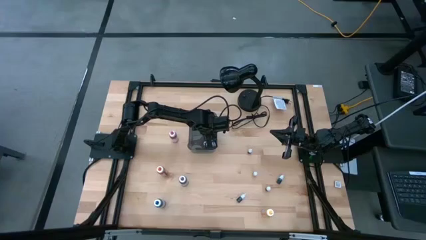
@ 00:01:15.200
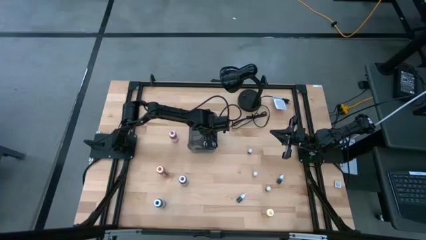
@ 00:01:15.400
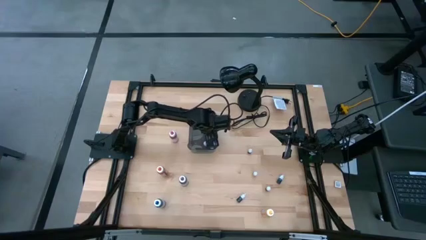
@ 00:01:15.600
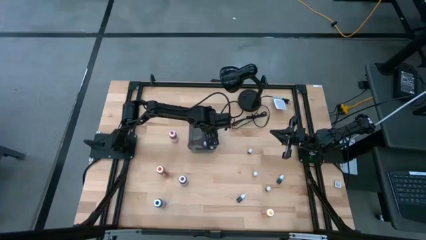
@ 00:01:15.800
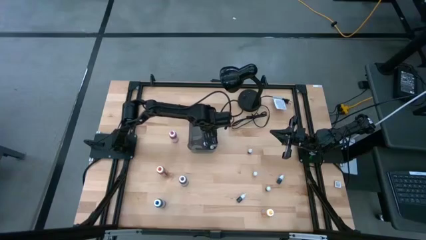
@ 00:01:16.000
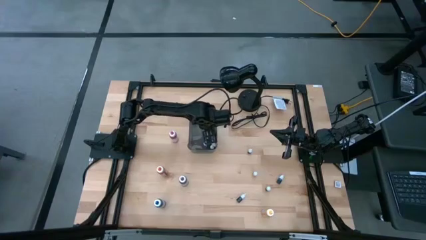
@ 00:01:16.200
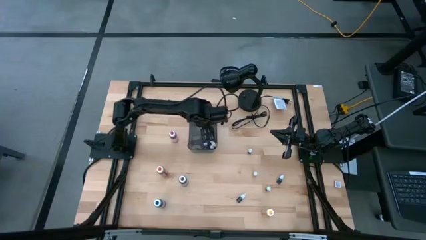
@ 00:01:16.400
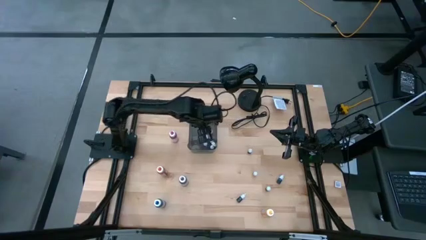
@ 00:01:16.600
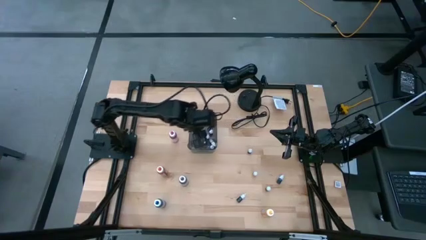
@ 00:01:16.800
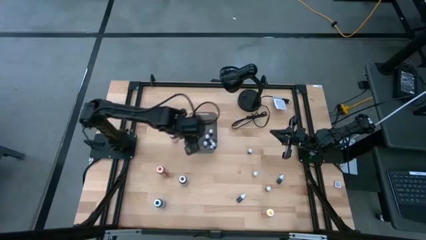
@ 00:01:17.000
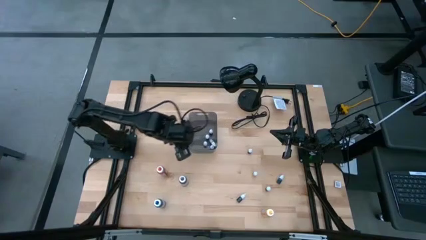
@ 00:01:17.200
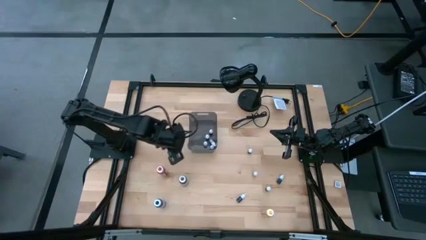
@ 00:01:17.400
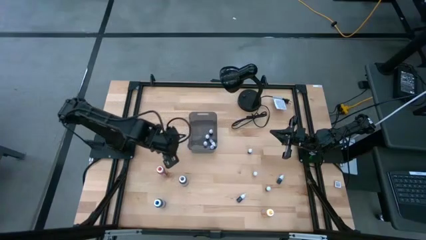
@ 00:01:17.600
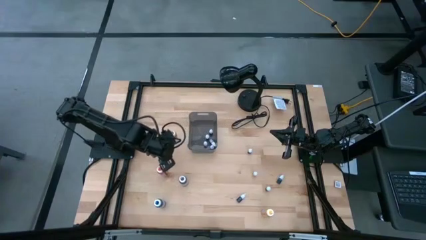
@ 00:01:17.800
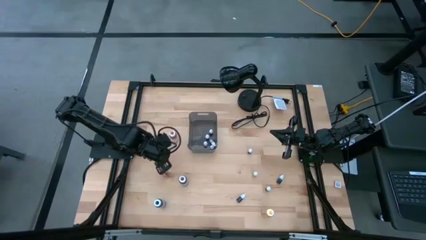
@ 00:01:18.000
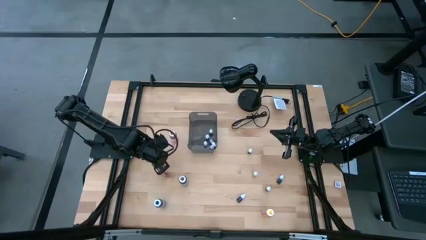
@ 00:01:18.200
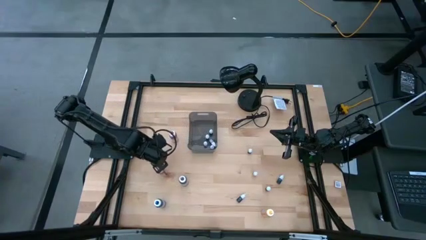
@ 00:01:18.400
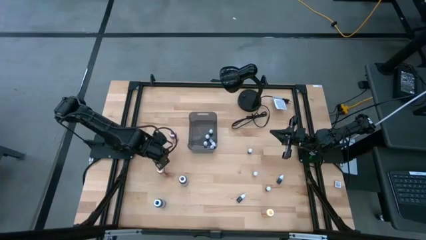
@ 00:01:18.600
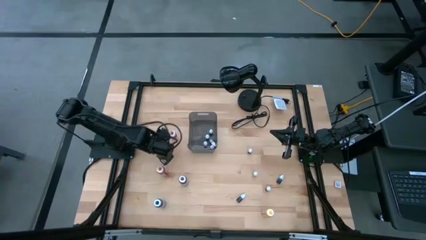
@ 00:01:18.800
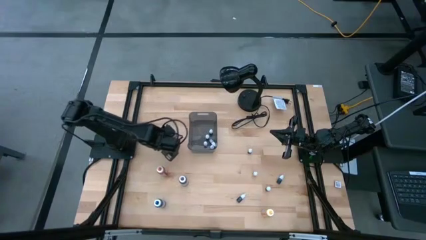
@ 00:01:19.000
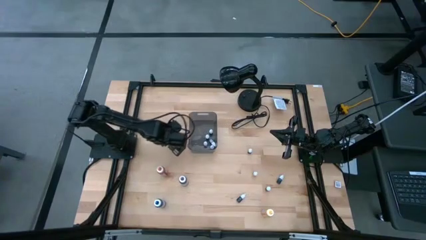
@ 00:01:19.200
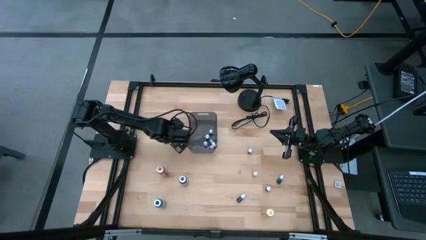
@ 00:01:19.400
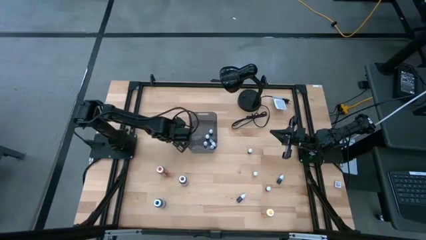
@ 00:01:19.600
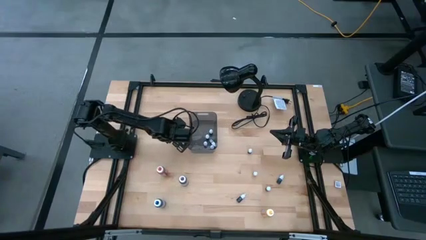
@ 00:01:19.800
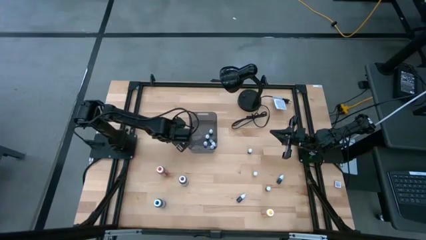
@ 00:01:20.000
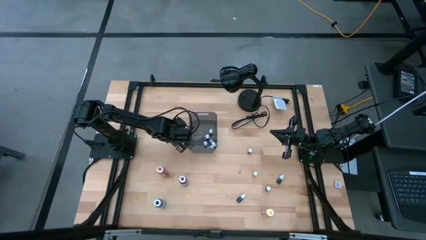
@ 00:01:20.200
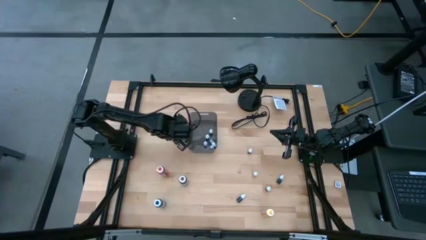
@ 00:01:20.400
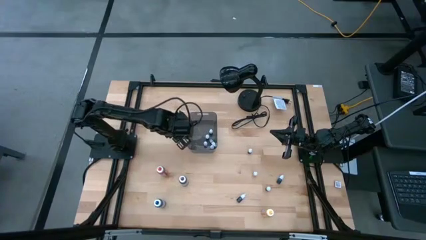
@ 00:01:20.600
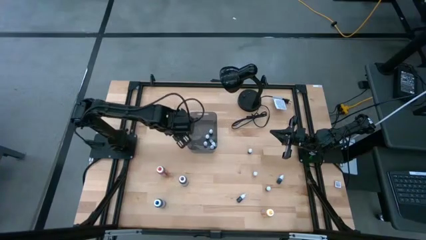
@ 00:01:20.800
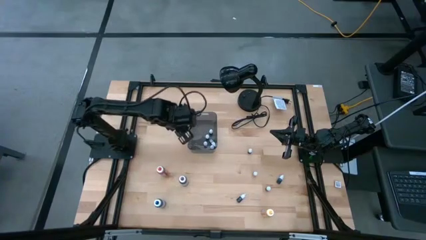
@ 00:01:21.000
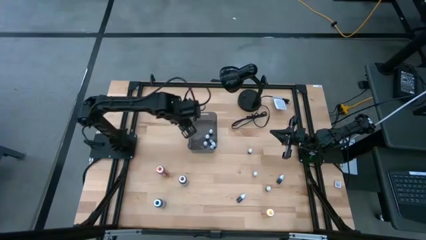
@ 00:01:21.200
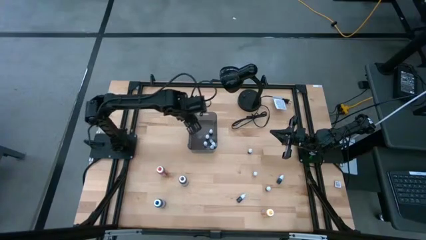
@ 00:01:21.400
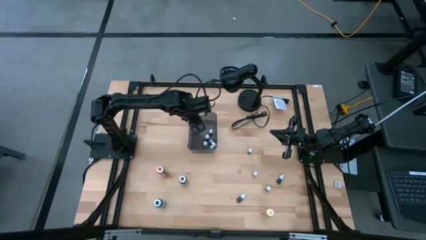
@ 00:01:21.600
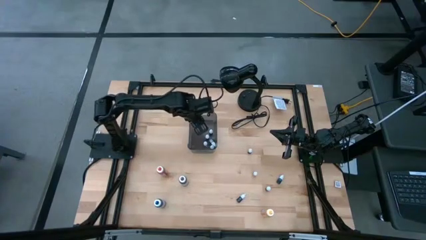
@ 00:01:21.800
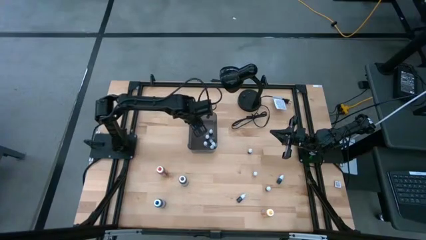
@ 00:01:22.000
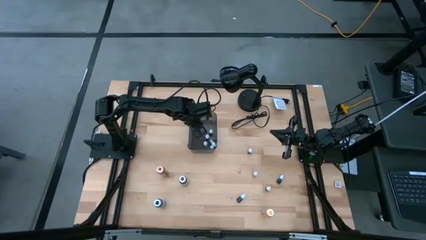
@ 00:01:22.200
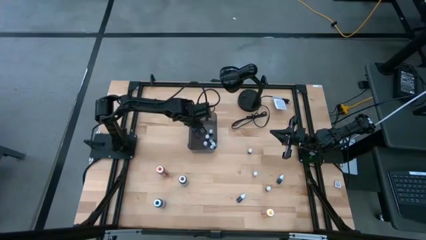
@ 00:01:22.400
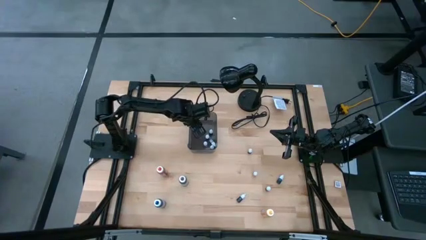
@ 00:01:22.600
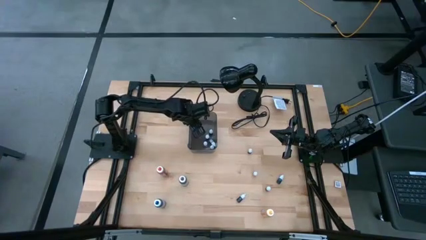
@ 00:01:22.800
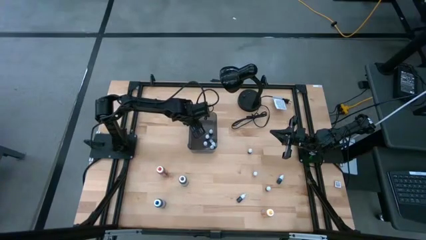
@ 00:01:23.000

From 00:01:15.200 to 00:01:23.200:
Task: Pick & Place food coloring
Put the big pink food coloring bottle into the gray transparent bin

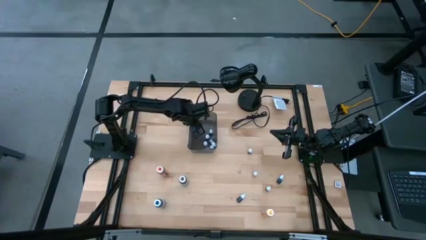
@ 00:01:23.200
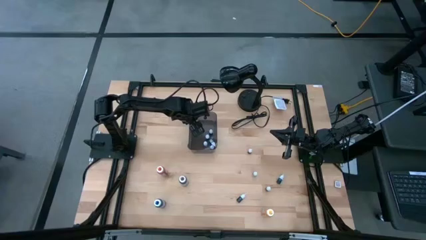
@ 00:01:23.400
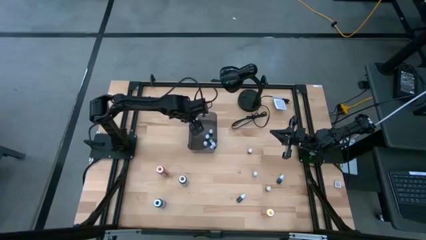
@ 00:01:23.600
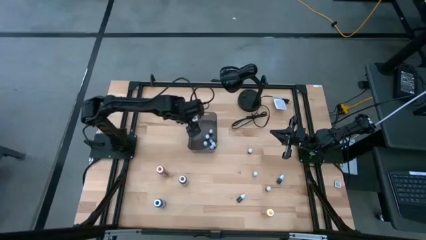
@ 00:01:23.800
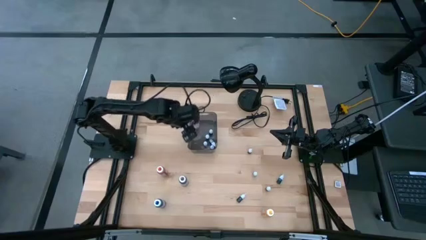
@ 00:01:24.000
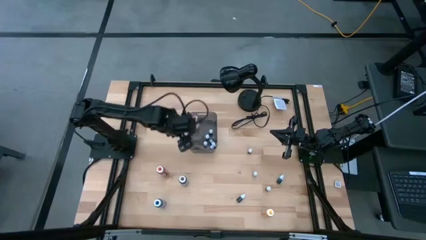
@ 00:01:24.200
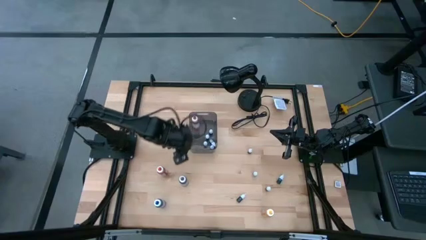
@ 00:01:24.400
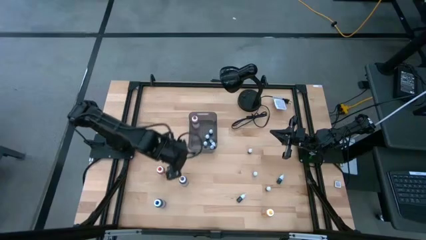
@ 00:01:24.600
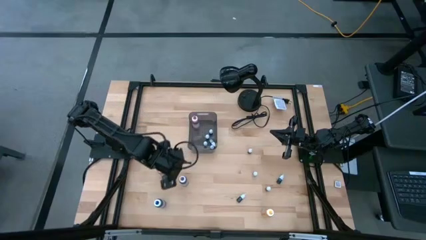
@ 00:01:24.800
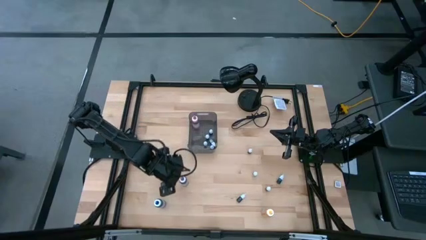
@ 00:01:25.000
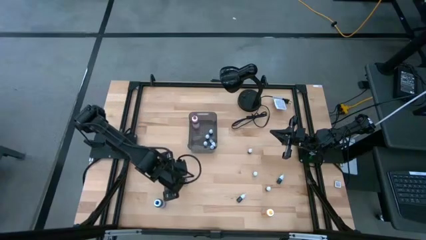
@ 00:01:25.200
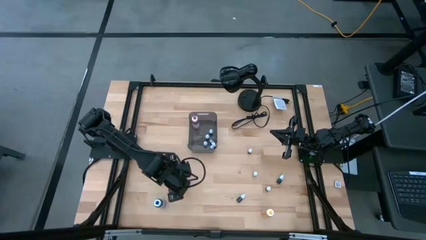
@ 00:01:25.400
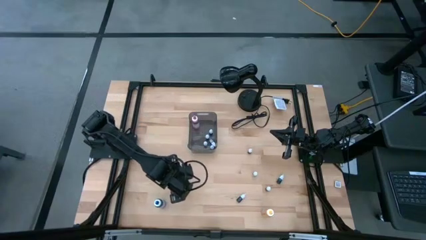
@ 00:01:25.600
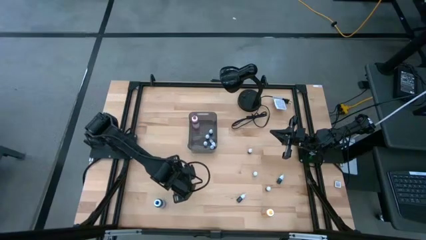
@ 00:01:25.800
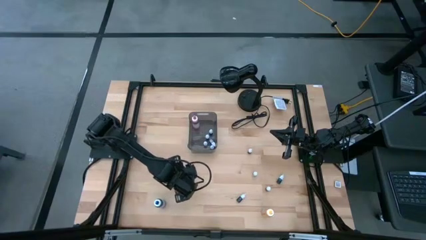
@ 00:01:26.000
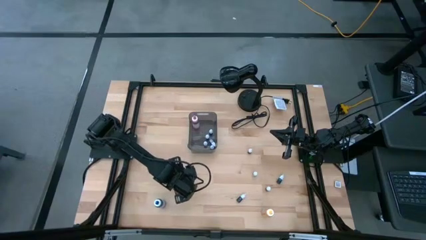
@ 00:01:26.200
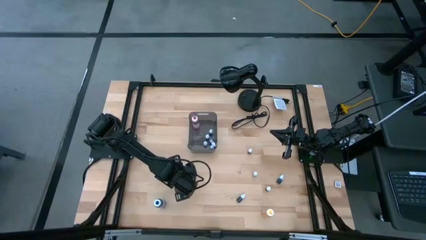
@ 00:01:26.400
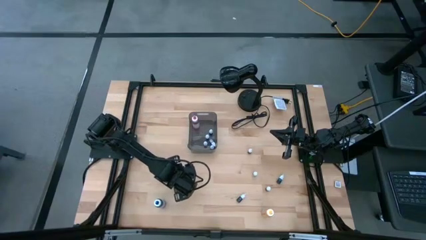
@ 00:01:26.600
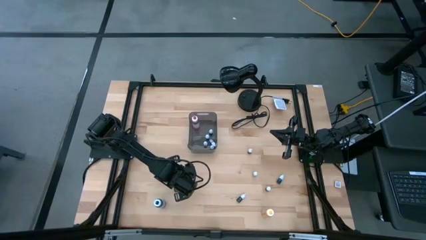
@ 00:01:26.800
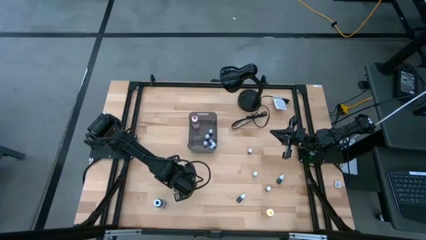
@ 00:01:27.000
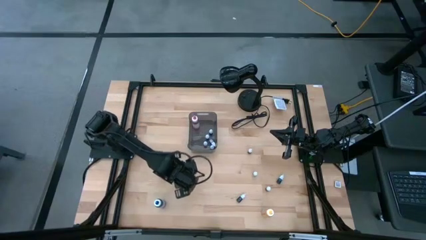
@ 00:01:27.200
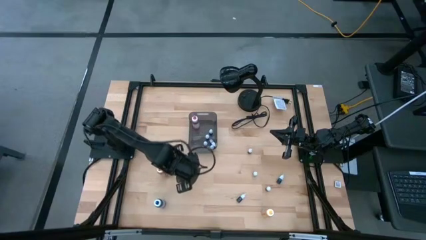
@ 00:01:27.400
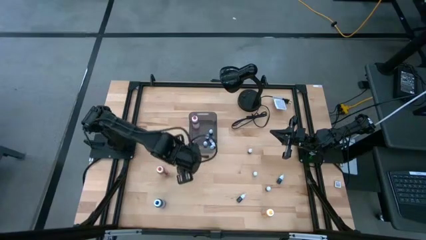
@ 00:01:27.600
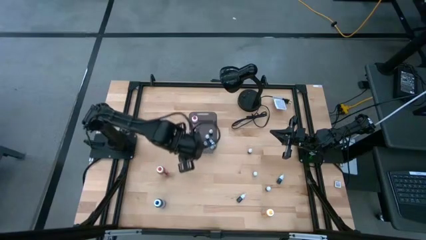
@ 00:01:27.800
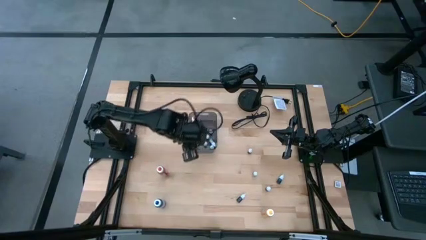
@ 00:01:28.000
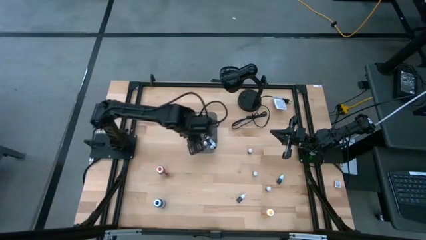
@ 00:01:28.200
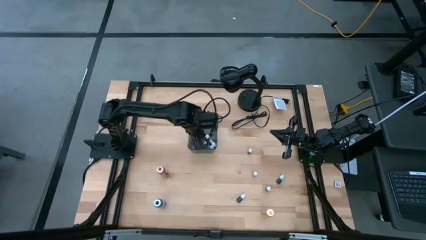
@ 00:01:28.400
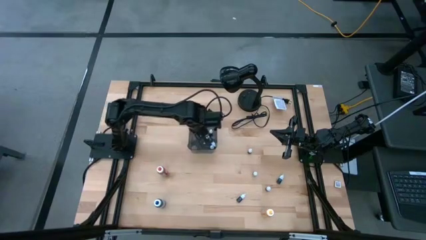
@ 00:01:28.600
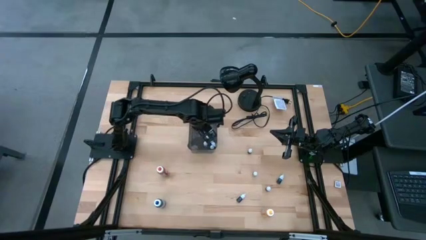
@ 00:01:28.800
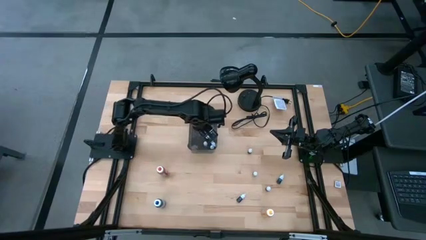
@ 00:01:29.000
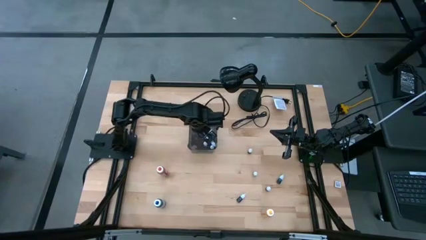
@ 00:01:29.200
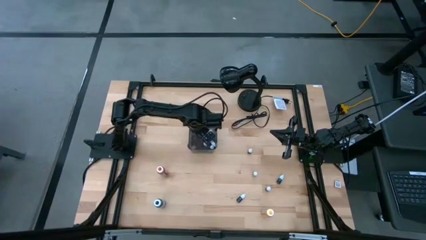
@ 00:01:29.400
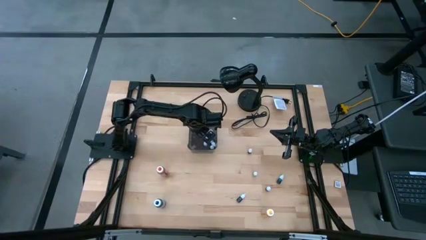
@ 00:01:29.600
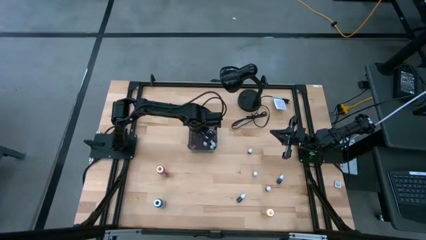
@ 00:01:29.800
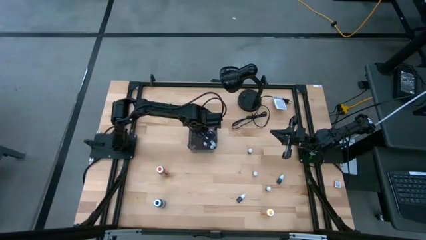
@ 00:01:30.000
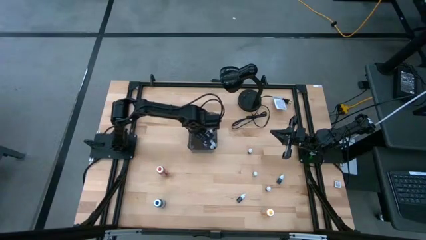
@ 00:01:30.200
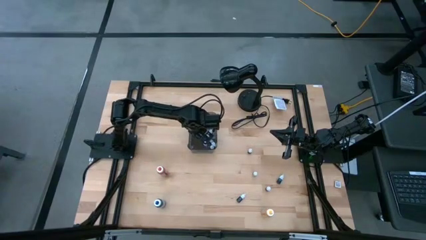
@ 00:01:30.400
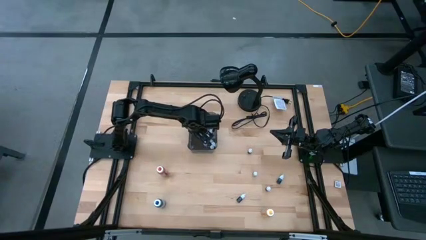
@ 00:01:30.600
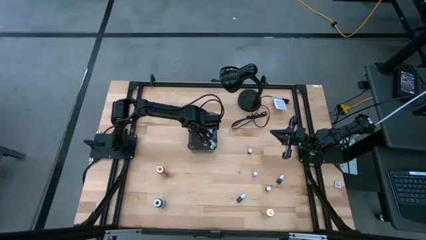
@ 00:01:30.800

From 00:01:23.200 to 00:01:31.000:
Put the big purple food coloring bottle into the gray transparent bin
